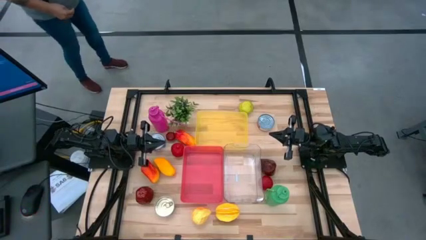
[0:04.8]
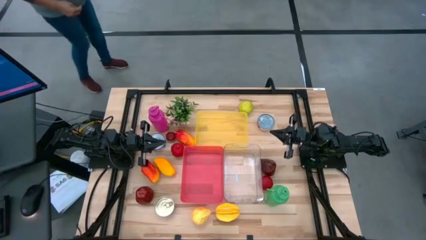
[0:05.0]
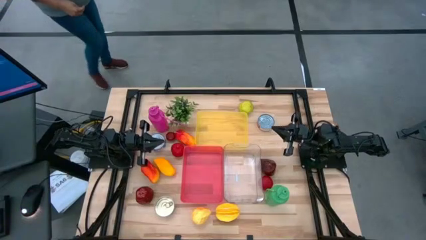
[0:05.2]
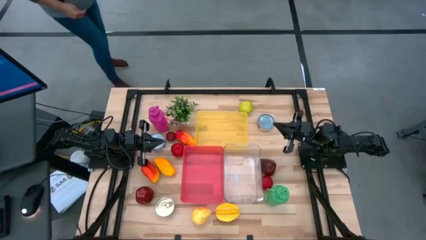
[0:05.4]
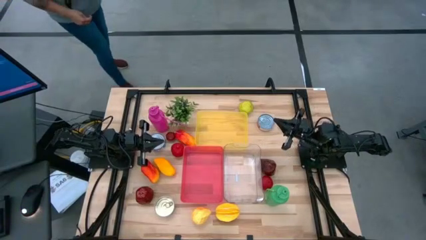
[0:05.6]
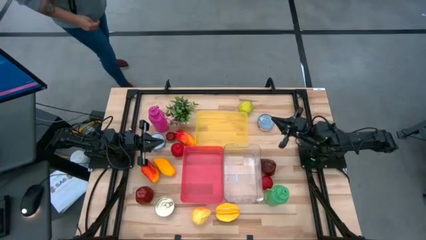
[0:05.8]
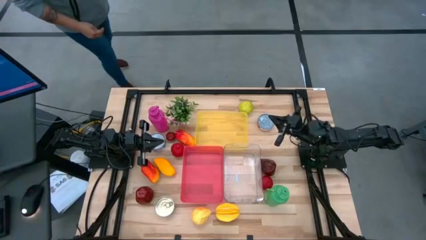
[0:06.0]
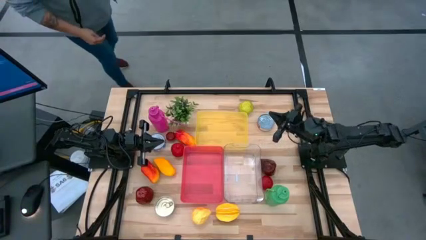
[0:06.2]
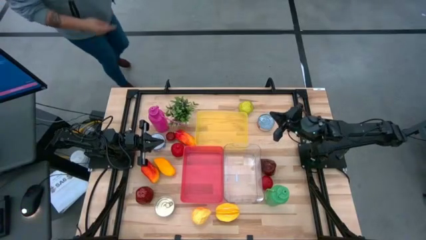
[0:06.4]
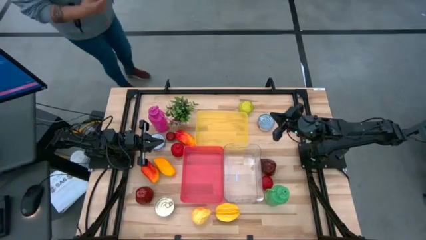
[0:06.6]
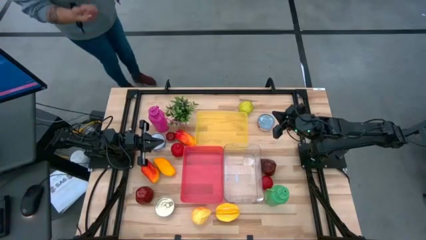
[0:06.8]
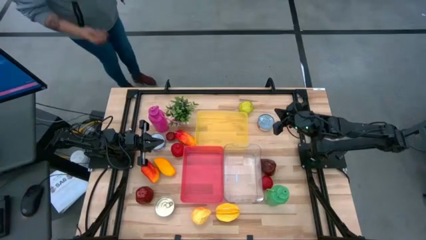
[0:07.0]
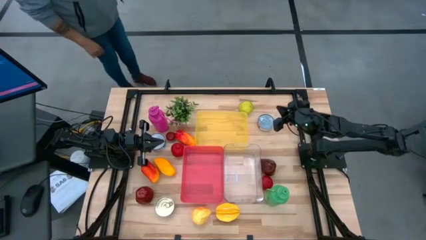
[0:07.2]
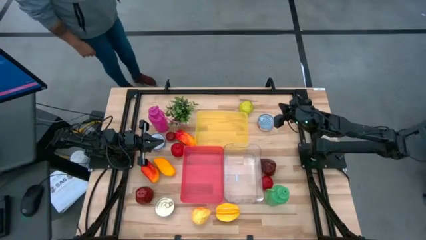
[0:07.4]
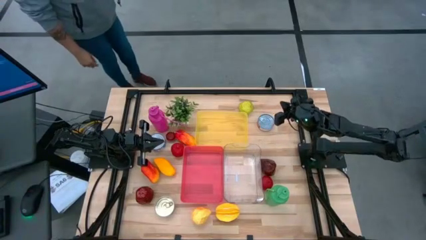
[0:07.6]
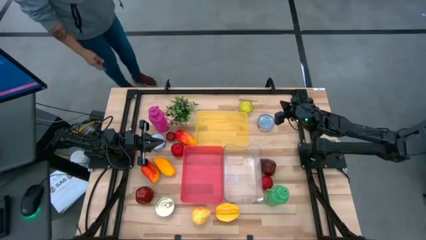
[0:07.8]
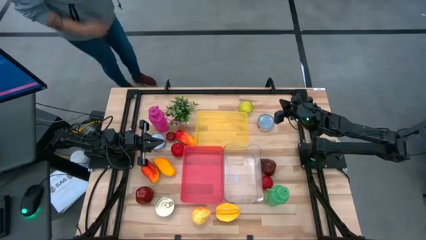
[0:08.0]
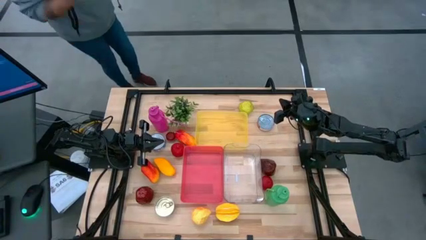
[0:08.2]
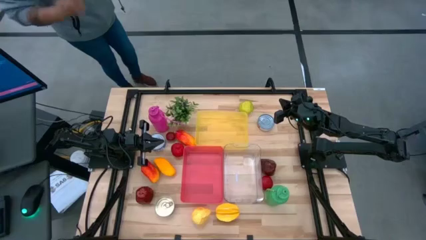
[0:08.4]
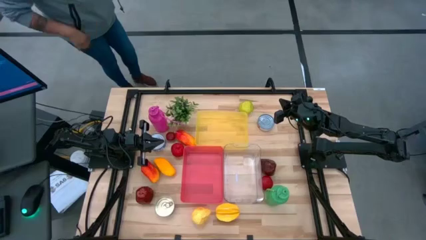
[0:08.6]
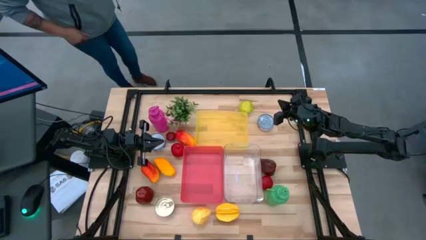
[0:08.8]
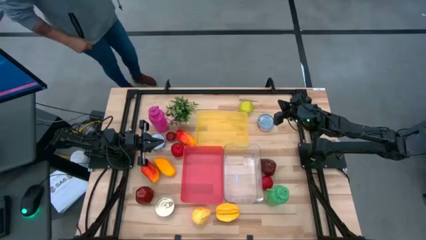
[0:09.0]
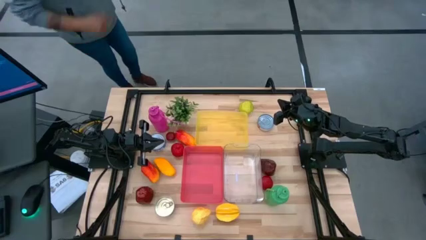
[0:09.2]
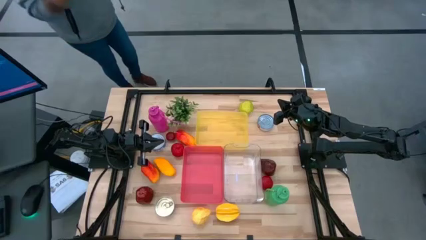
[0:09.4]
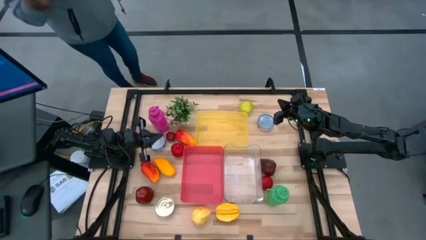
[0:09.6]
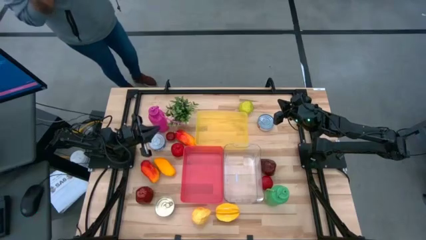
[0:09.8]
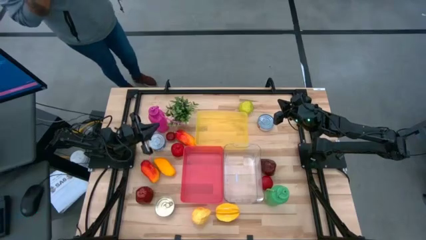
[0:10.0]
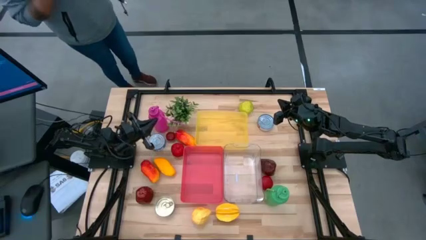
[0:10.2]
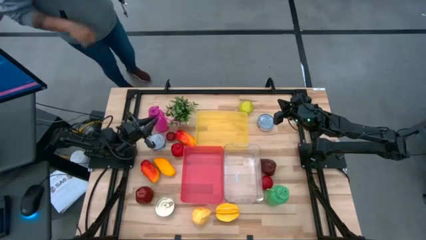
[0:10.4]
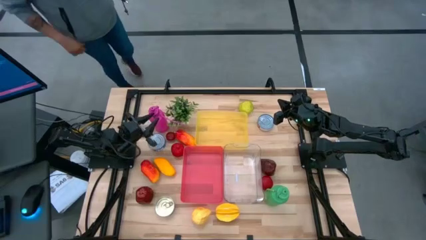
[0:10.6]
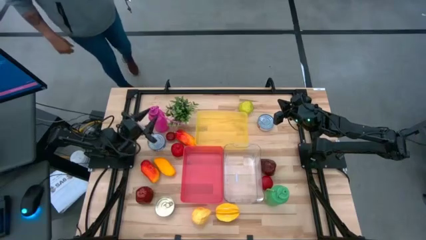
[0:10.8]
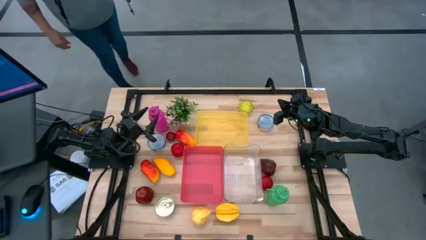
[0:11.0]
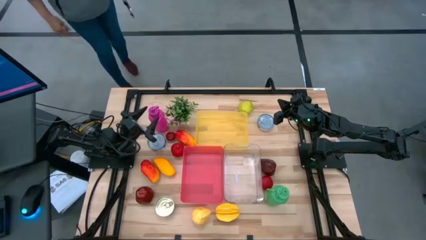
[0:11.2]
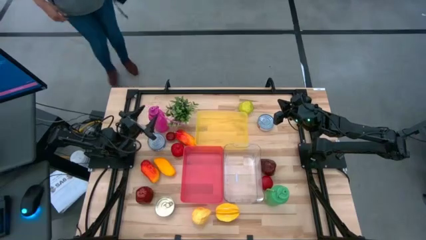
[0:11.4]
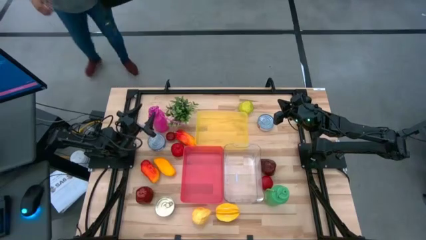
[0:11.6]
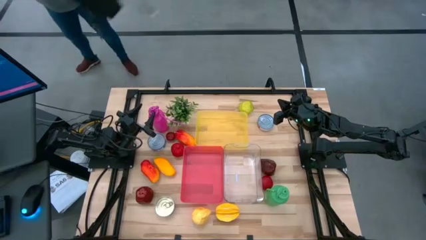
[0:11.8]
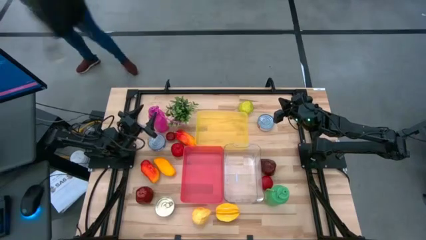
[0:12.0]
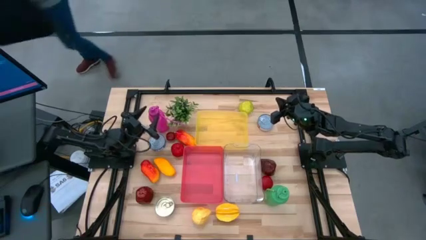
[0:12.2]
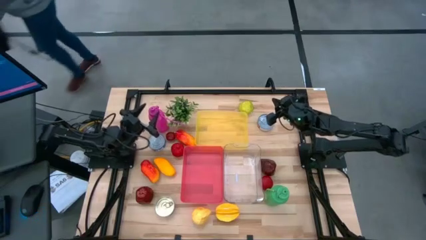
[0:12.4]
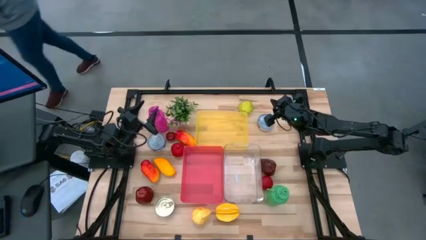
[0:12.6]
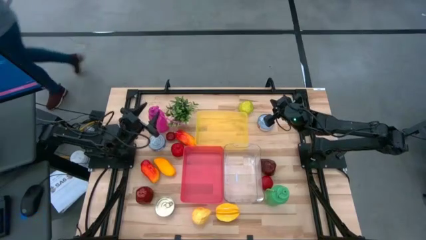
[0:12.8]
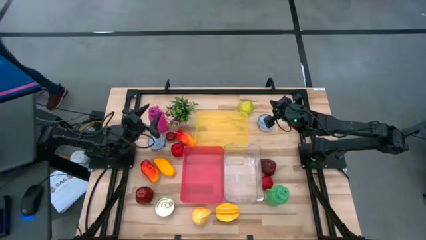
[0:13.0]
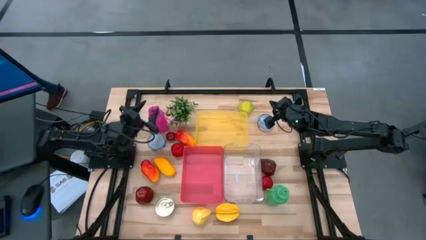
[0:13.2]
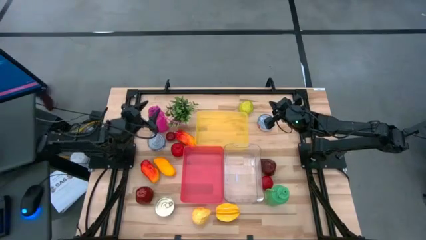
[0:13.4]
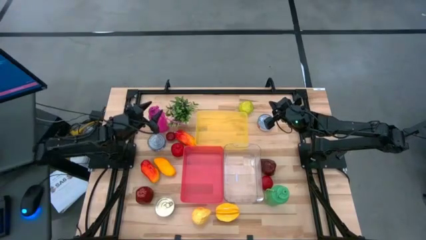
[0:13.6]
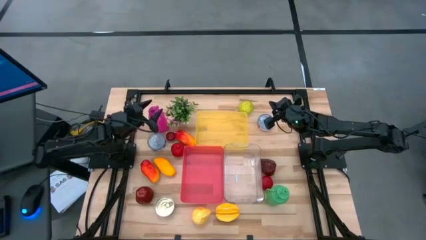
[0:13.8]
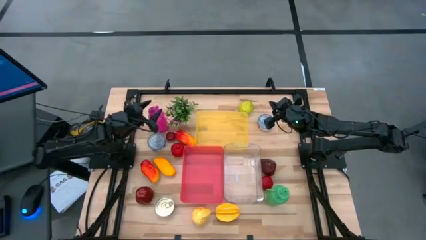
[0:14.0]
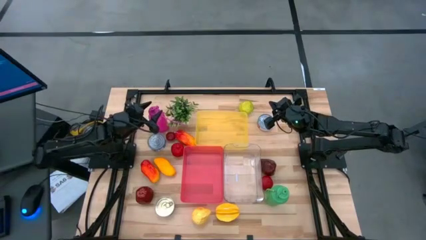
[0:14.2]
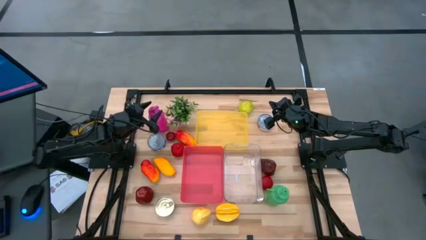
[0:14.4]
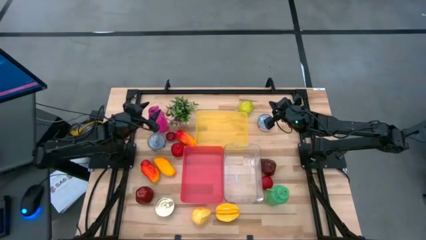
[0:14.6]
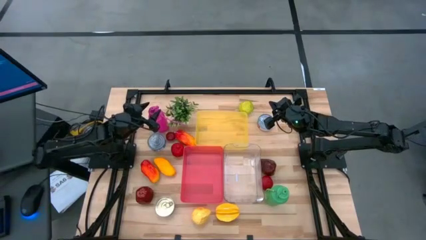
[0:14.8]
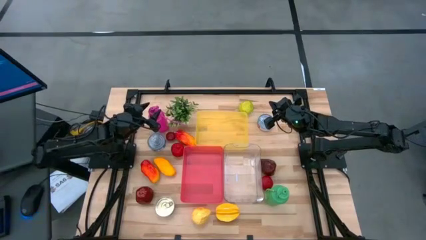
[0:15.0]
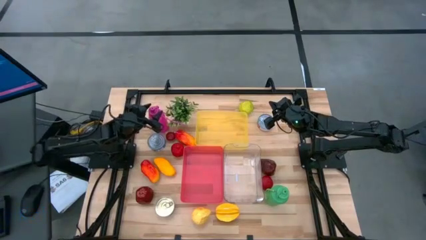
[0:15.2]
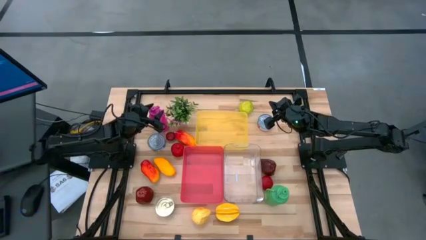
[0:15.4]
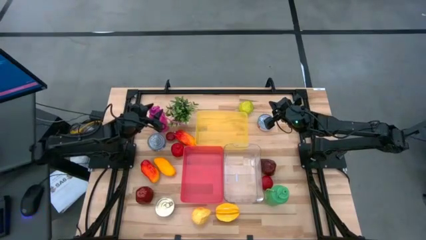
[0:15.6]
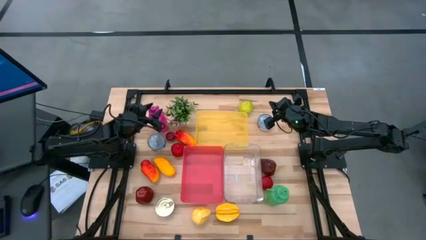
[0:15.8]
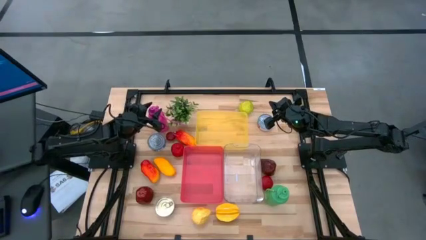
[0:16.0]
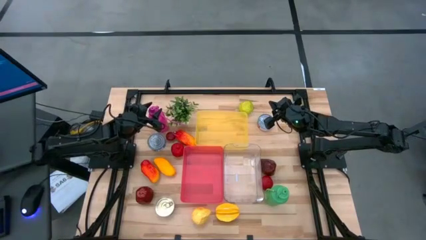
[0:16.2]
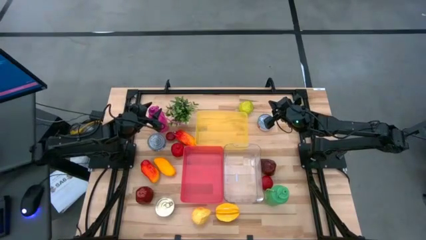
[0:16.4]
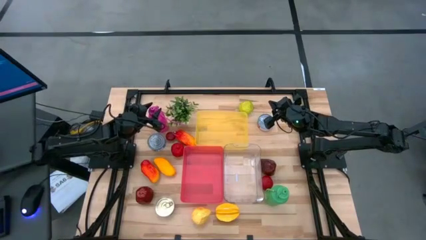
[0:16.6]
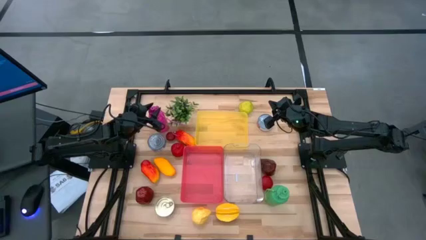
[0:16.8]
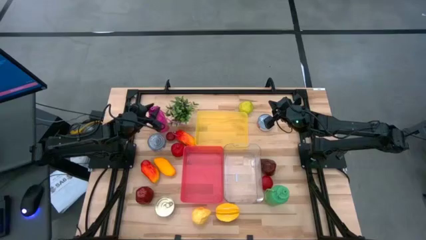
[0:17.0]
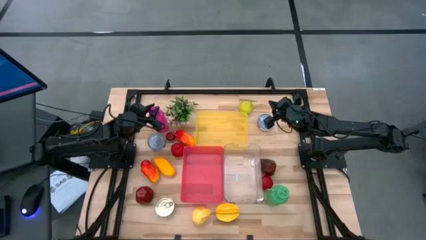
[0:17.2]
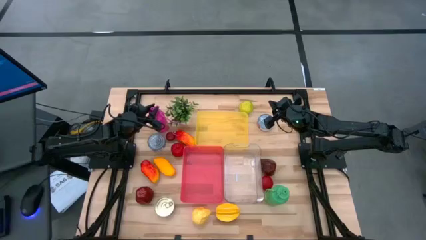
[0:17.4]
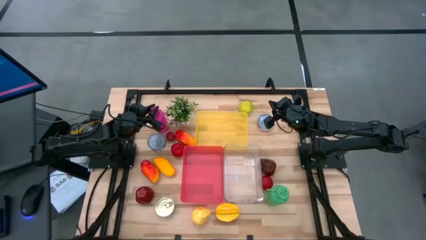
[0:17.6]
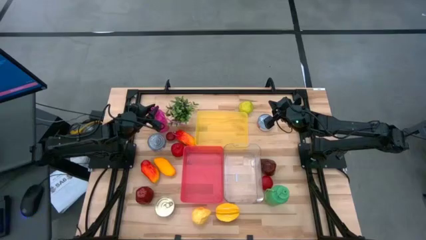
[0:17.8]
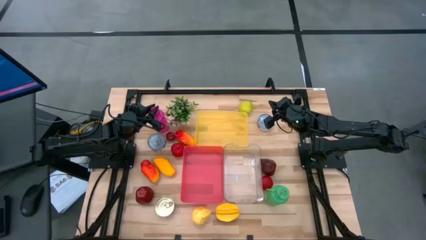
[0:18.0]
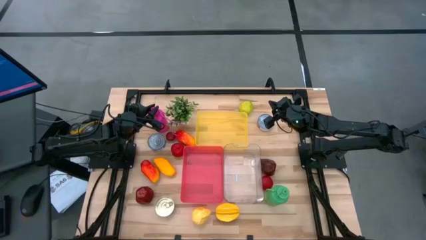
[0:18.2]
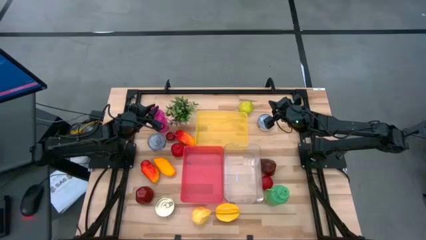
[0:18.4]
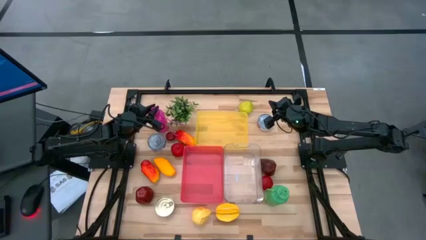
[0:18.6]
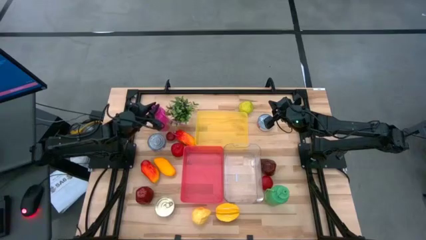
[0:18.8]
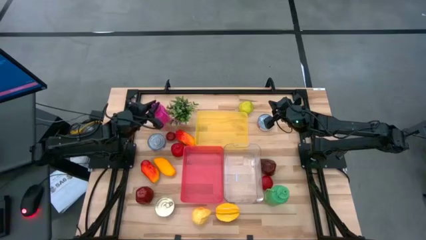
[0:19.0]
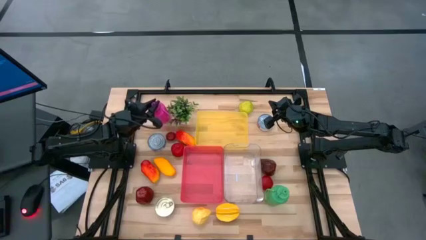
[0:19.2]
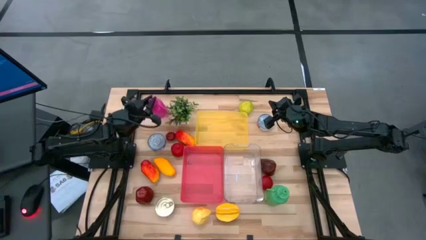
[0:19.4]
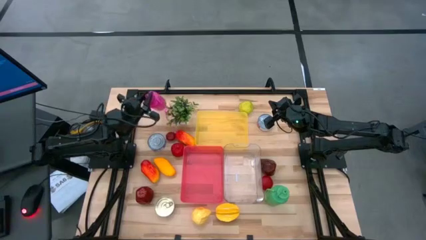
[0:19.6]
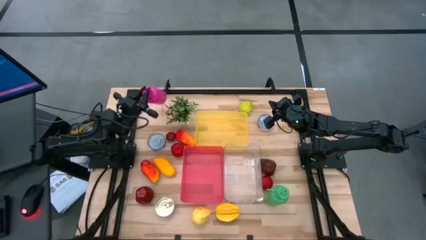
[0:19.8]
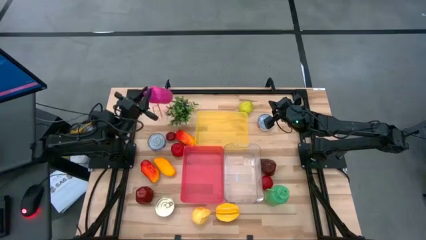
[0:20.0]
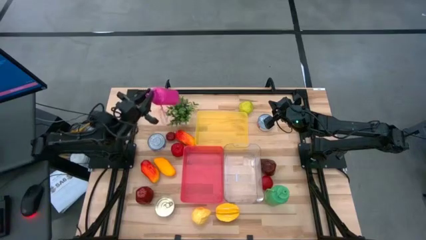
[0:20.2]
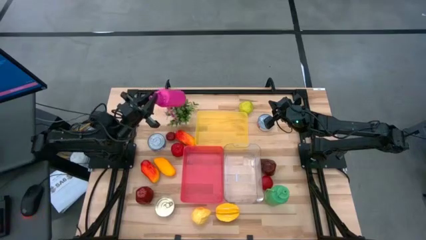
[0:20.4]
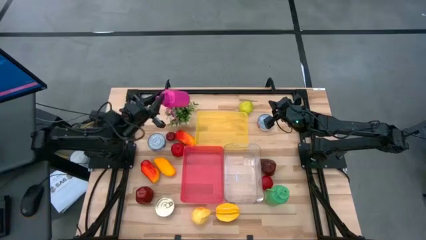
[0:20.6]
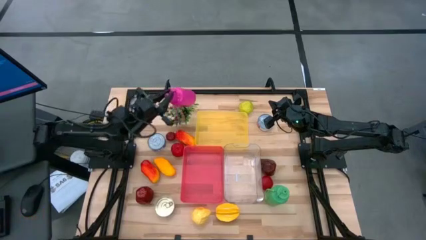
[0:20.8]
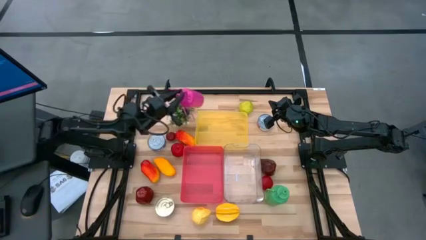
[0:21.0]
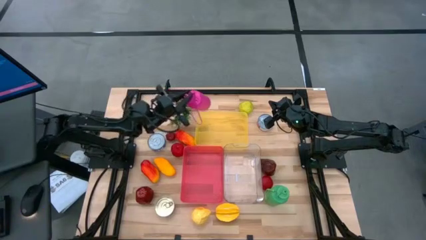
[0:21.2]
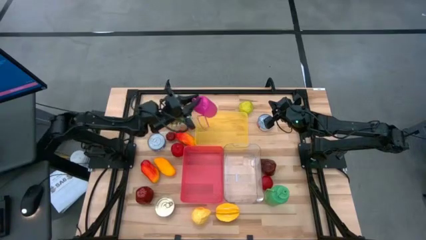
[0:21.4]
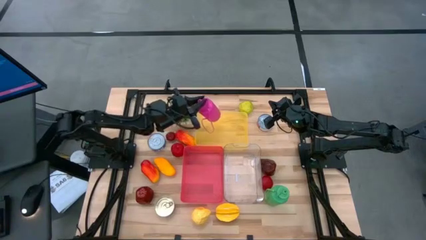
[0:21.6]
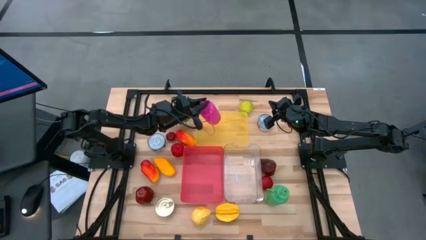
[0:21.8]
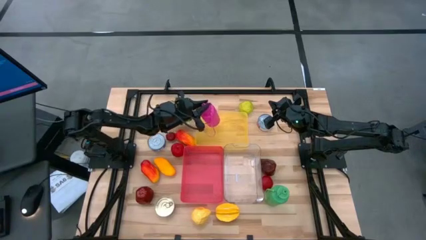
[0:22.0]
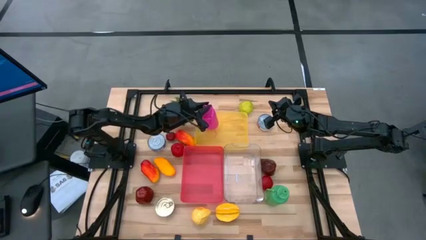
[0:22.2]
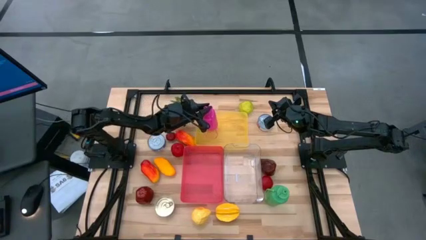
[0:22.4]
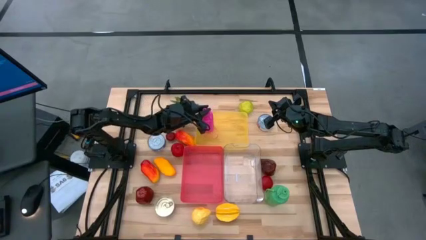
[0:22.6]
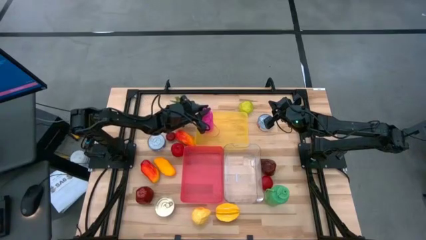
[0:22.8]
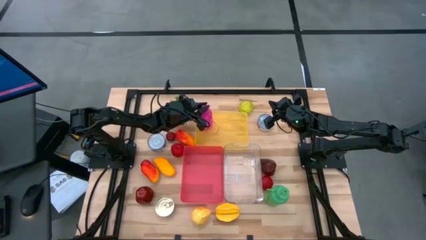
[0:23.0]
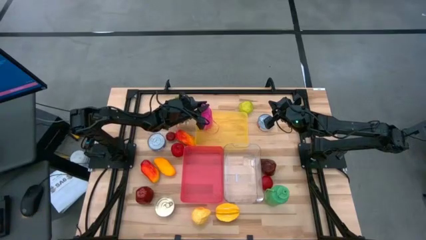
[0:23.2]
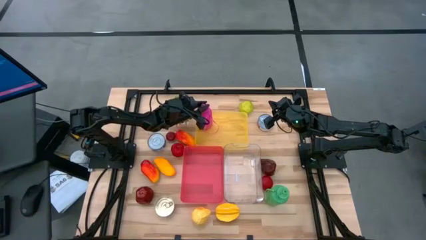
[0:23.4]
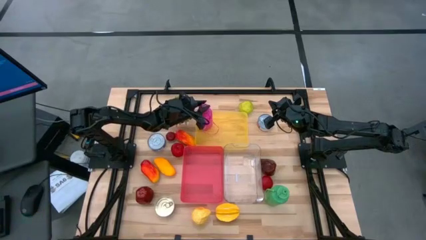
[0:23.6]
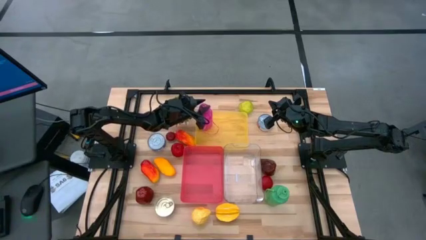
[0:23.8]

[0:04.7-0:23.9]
Task: Pick & Place Food Item
Put the pink water bottle into the yellow bin
